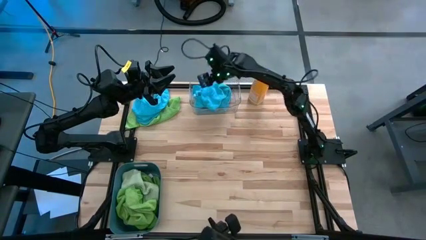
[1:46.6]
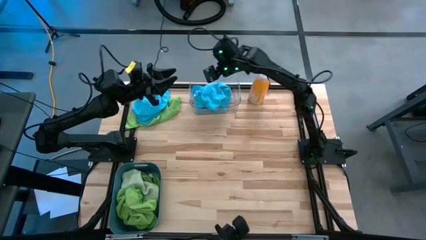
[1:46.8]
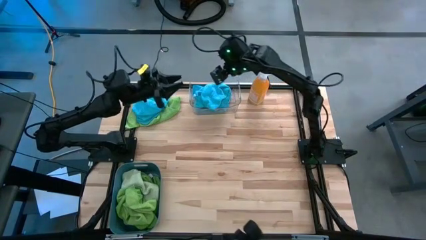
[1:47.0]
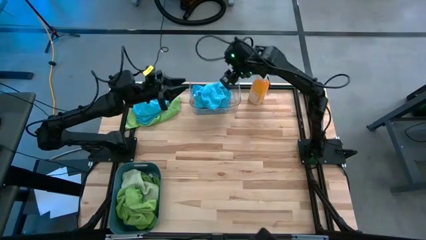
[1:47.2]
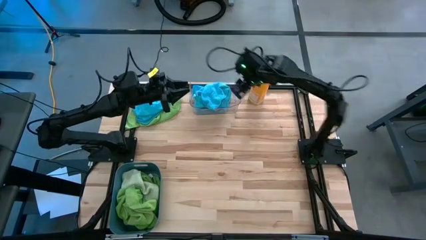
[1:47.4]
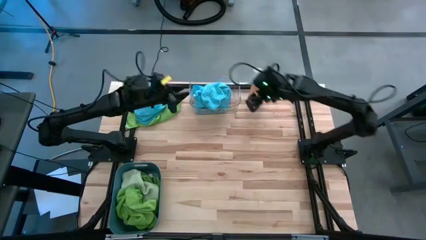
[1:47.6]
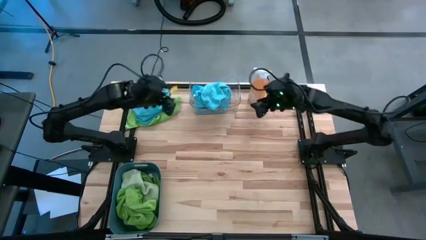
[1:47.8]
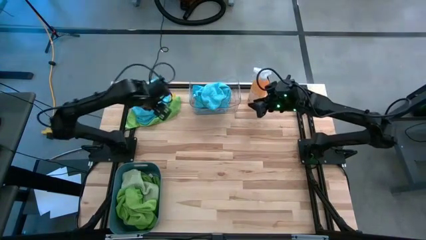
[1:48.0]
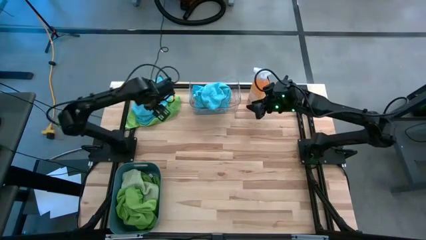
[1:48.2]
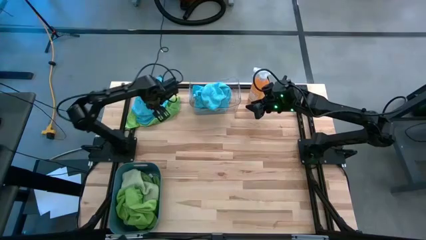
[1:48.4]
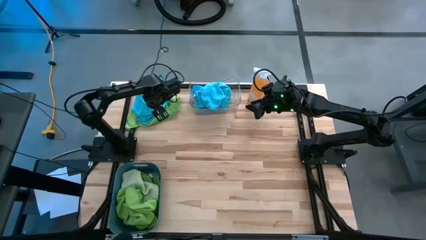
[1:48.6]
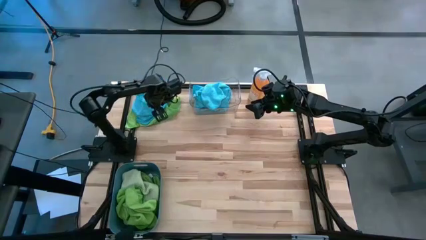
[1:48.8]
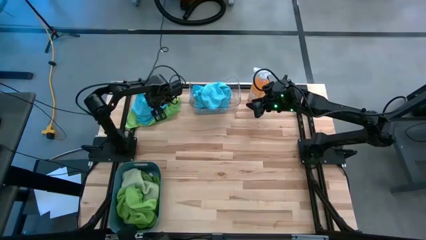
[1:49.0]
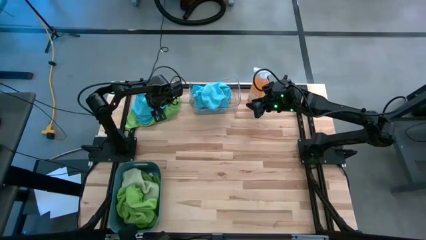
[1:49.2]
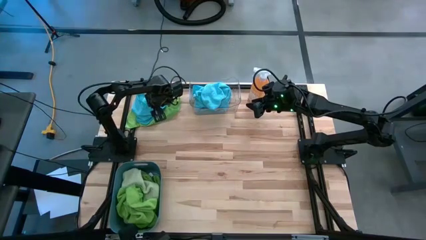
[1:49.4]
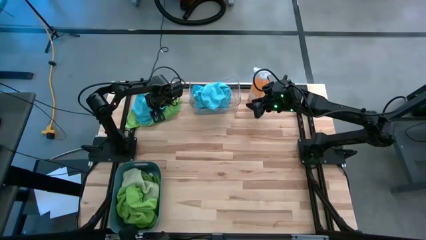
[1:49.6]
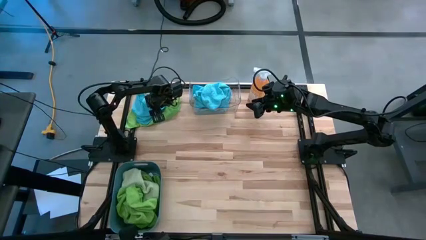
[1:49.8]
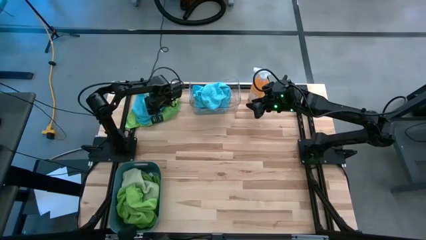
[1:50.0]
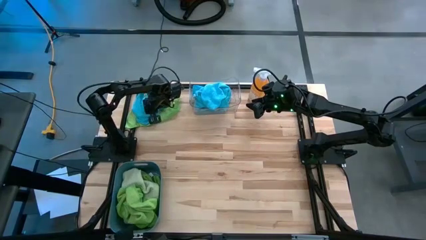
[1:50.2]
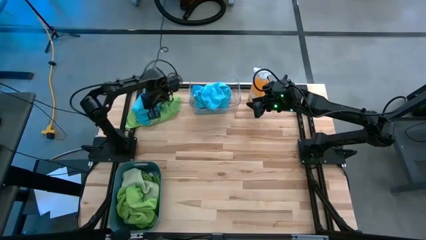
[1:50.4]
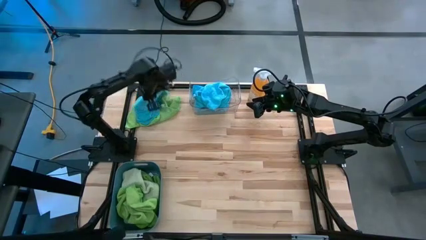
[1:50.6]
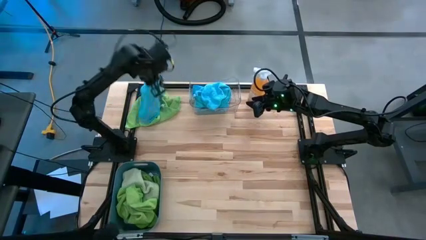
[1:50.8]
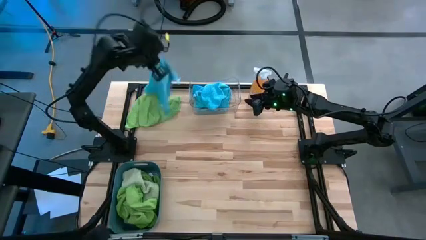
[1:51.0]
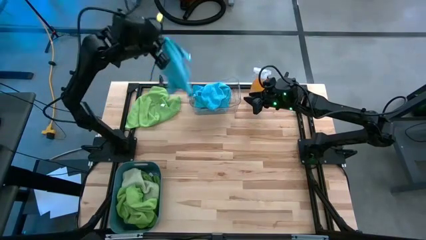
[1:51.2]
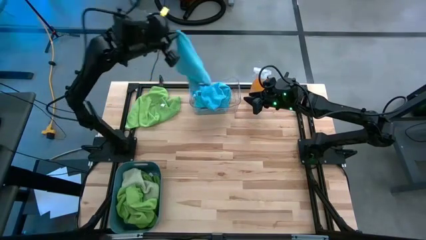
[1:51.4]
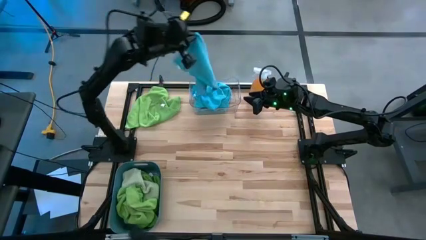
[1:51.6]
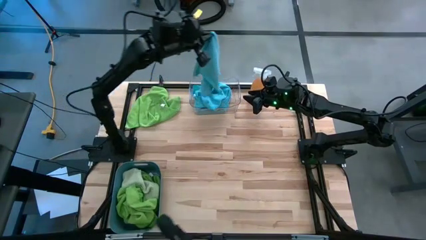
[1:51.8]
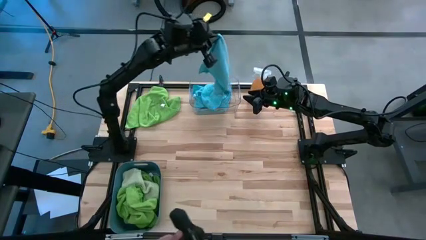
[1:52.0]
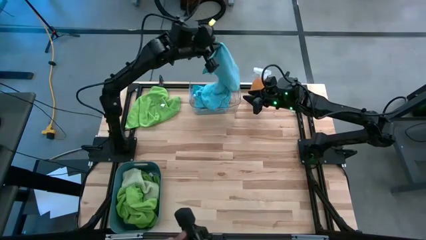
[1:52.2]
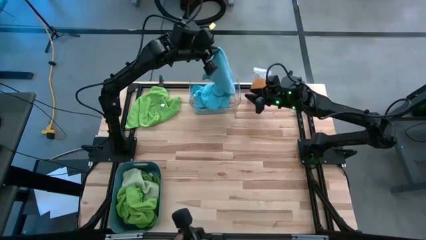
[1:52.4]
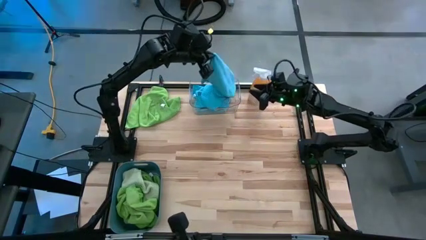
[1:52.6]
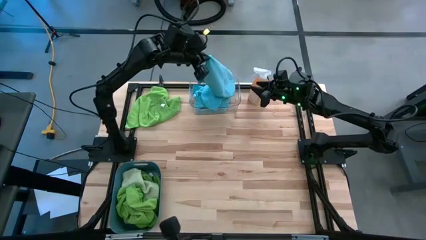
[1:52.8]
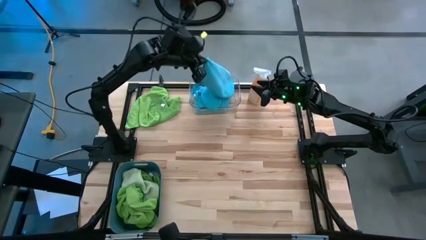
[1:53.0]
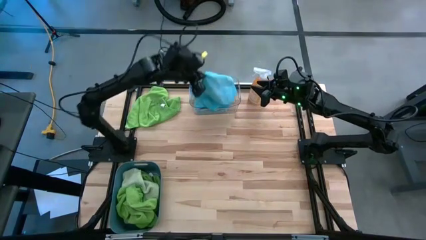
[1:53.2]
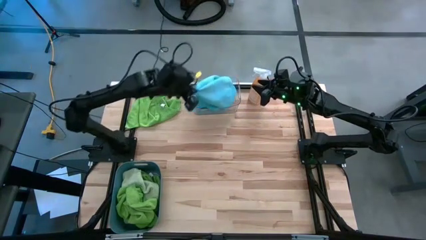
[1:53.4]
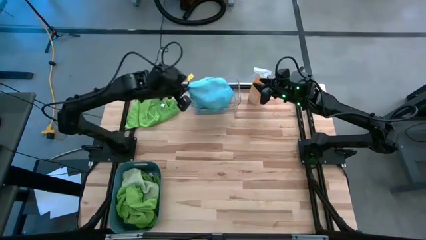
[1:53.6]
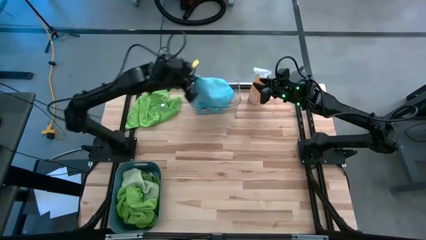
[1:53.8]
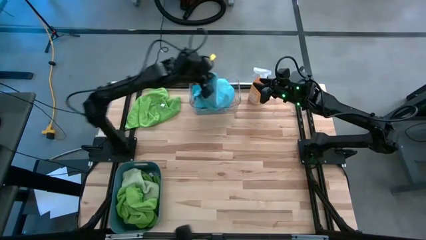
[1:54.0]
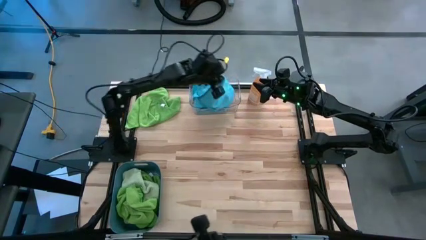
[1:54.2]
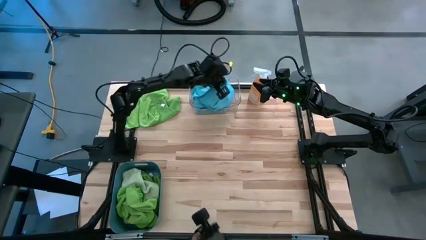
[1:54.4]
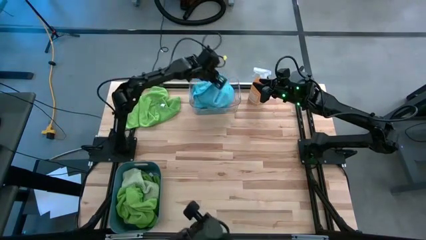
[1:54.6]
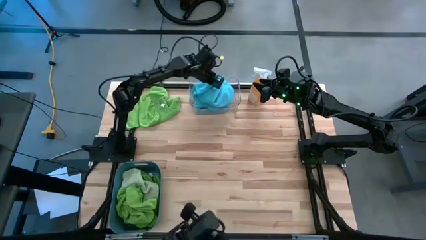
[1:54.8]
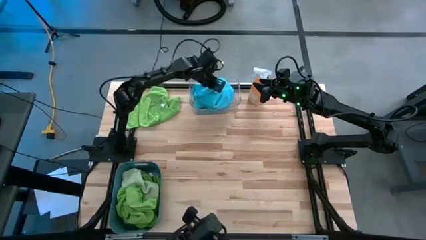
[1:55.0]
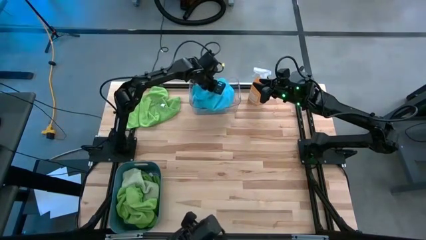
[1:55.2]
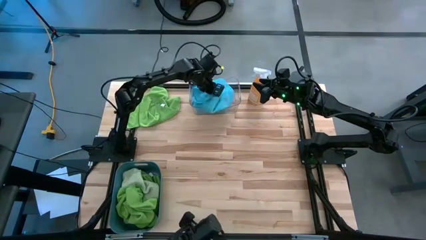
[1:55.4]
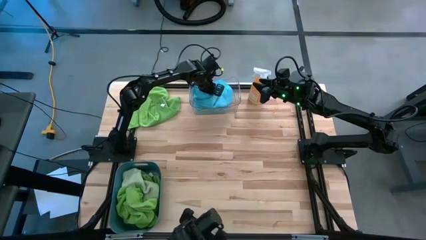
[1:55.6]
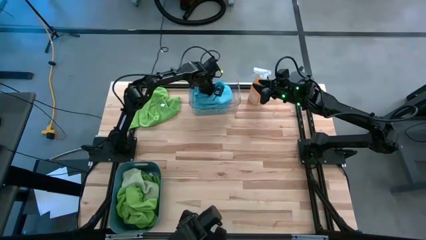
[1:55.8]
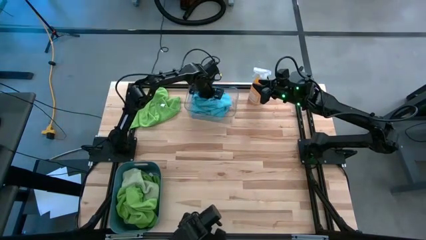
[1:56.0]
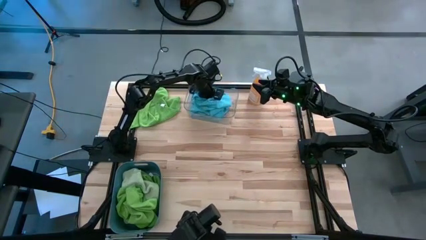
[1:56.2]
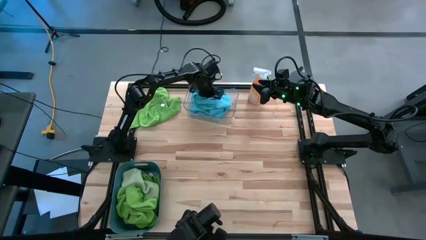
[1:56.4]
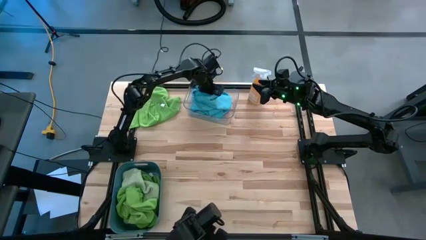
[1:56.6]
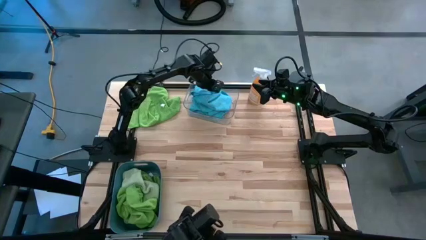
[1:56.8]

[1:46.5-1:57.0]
Task: Sort microfiber towel by color & place in baskets
Put the blue microfiber towel into the transparent bin

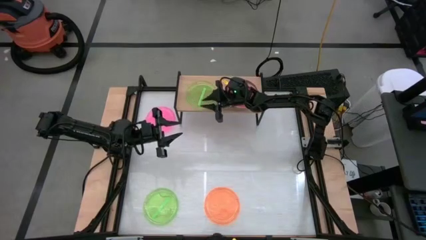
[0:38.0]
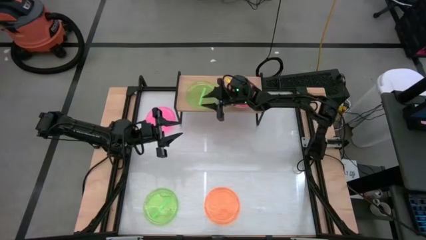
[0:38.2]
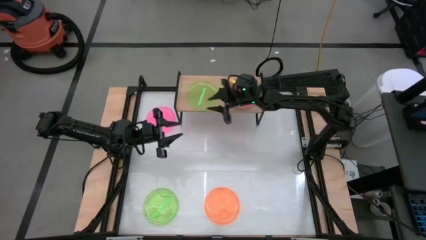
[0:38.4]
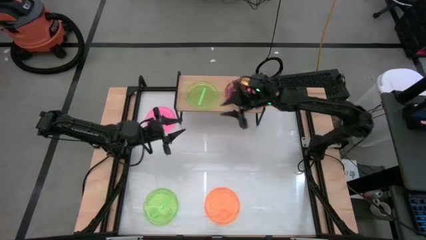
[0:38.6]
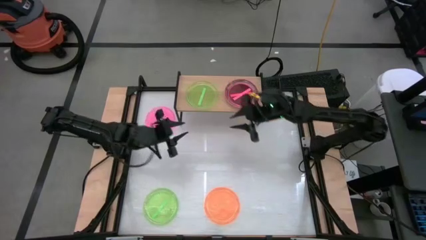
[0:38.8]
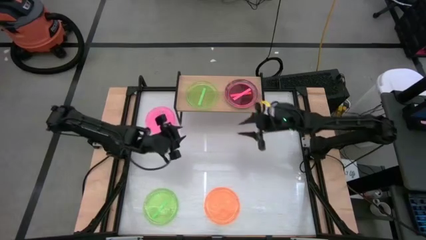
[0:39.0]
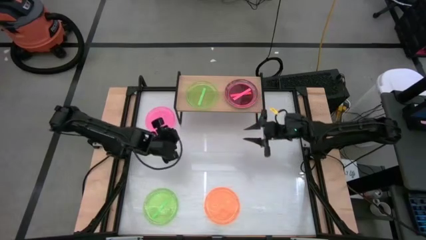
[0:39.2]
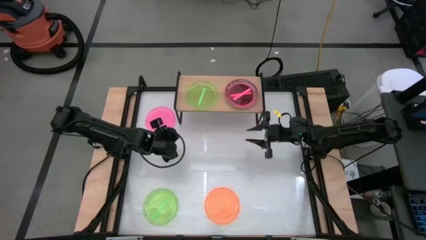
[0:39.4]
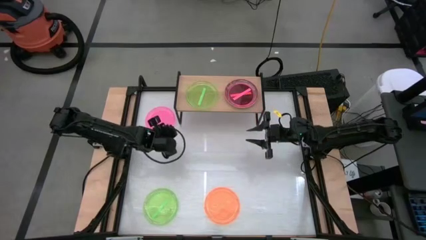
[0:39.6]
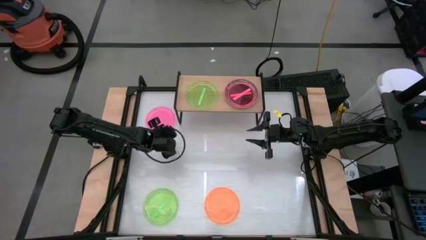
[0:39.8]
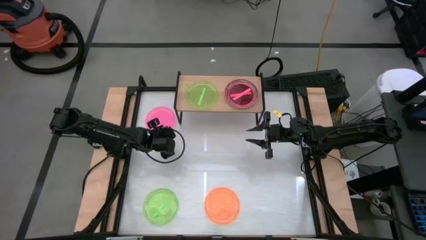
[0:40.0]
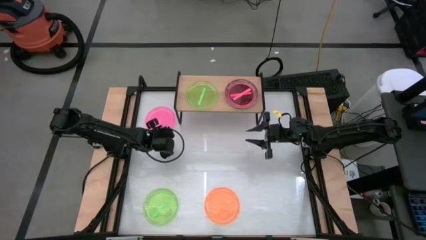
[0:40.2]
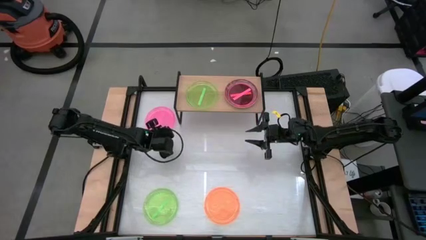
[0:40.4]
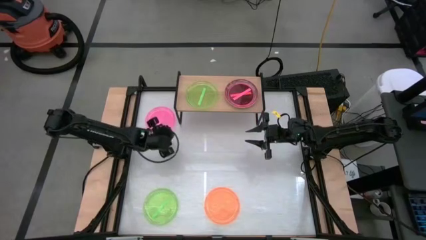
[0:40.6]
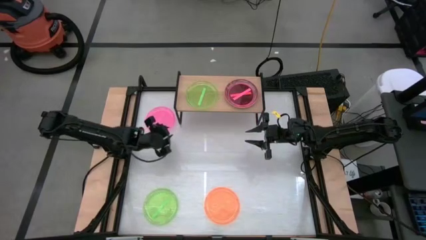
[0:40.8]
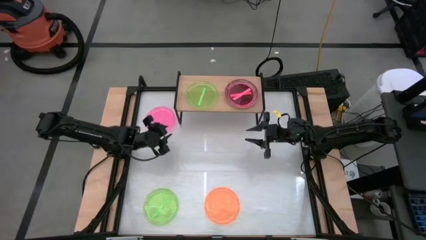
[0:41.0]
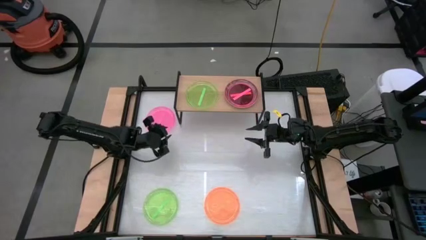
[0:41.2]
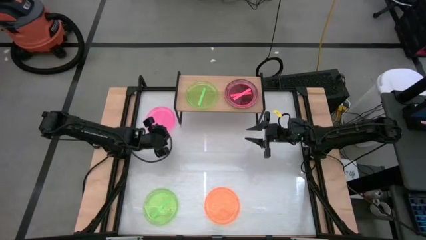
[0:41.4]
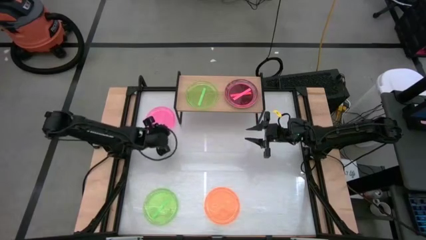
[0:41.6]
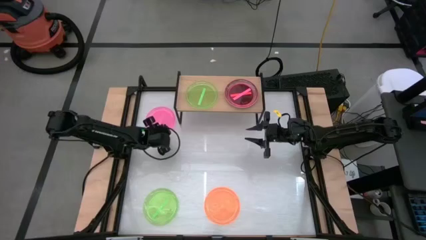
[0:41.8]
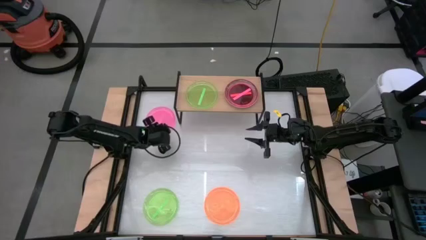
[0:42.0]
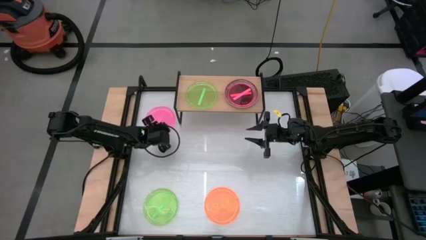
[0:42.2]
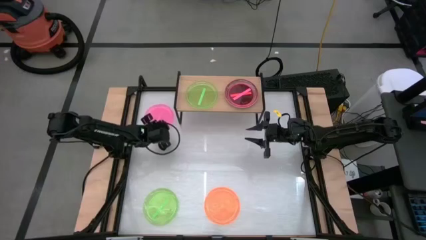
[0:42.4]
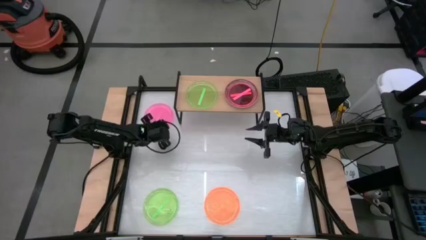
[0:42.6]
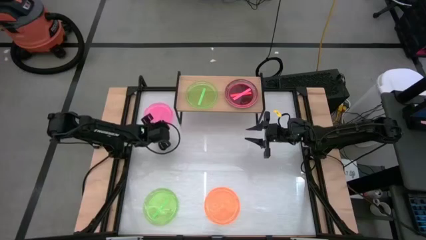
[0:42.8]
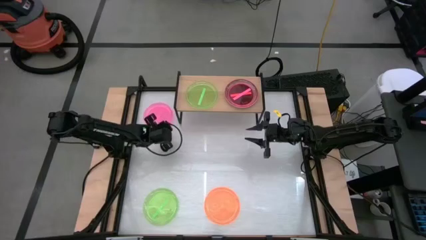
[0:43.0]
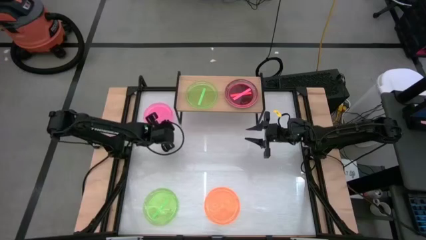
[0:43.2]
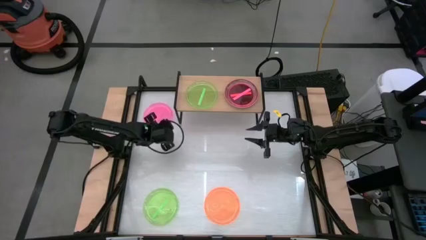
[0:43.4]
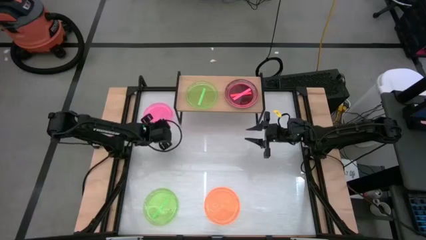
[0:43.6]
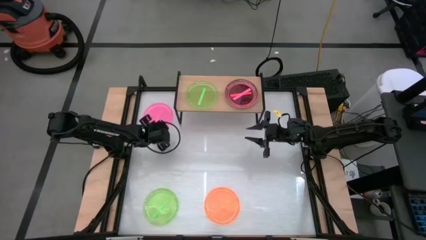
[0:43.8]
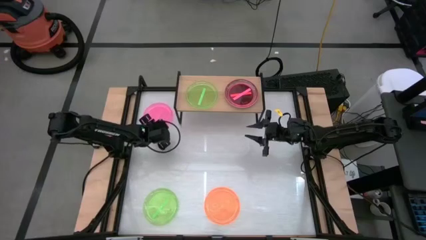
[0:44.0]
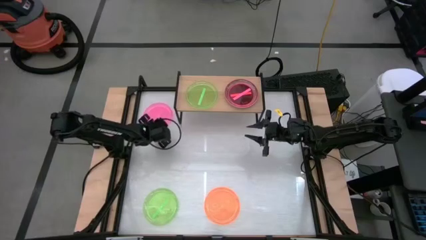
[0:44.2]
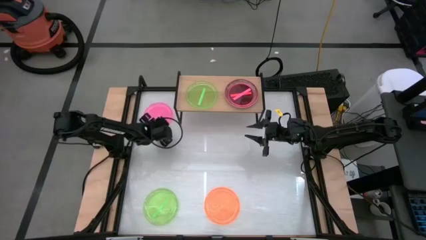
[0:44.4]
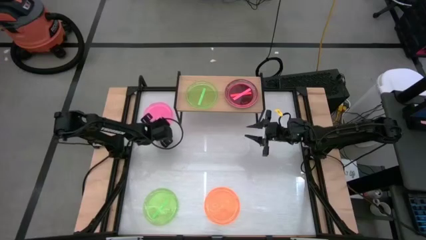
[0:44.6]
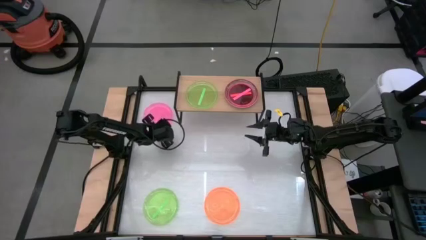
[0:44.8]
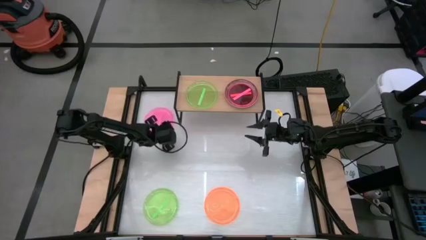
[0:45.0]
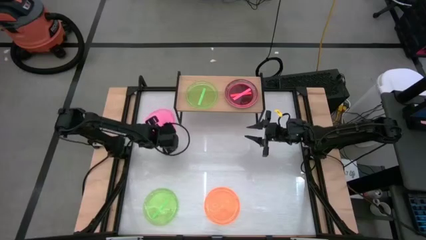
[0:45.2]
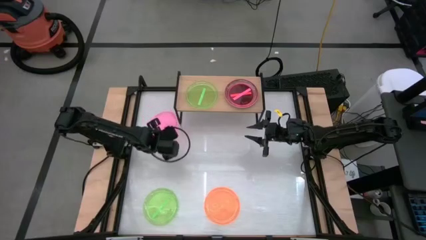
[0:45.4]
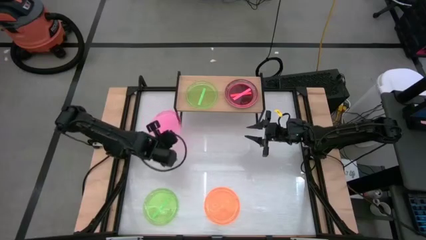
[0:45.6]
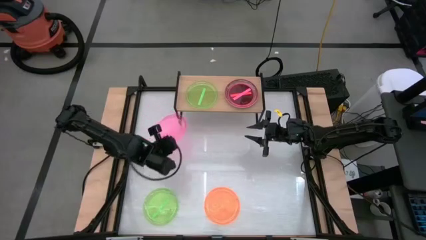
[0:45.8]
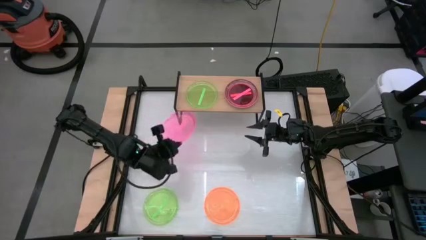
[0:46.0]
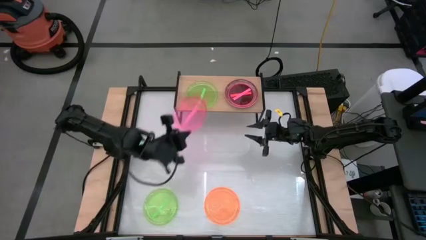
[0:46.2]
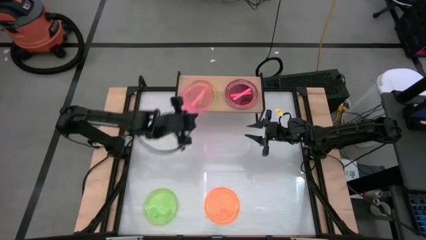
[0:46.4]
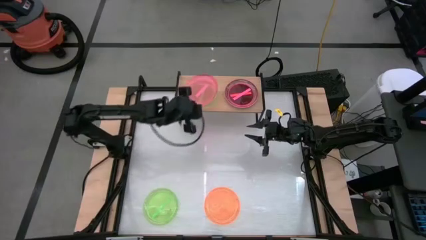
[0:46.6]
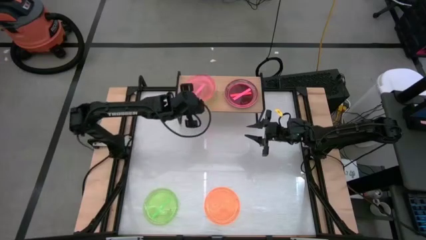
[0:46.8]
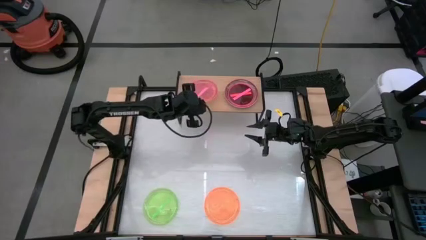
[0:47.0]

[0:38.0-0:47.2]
Task: Place and stack plates onto a shelf
Stack the top pink plate on the green plate on the shelf
